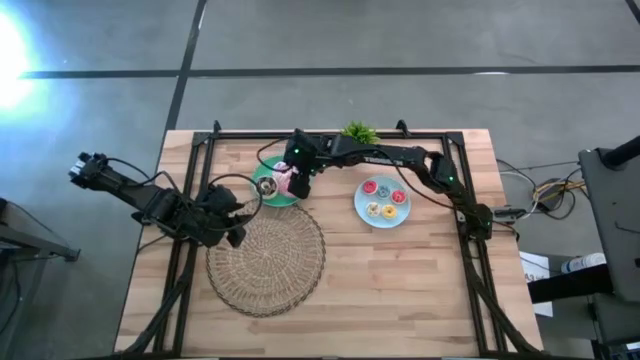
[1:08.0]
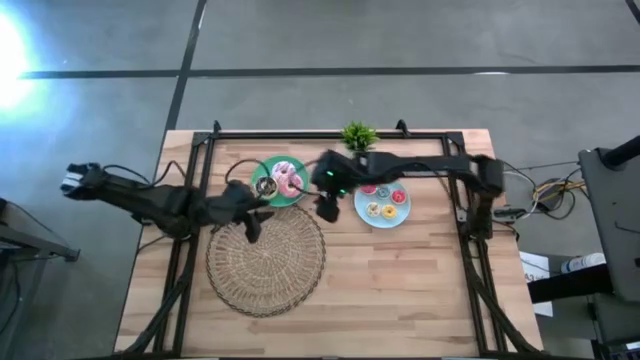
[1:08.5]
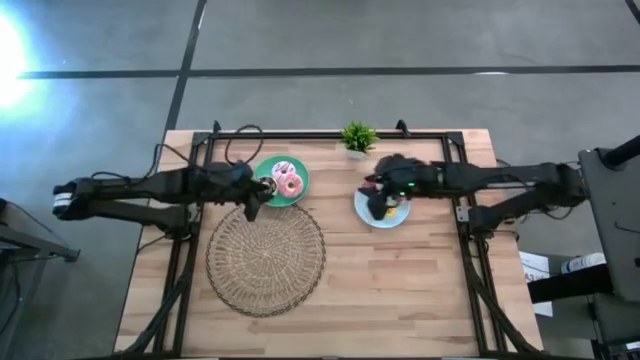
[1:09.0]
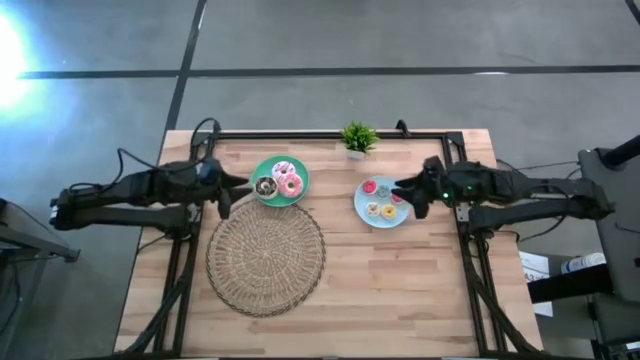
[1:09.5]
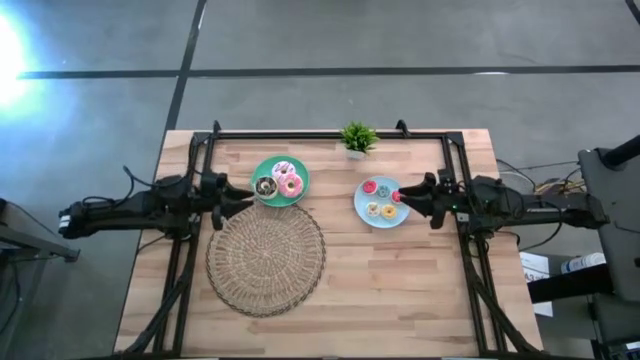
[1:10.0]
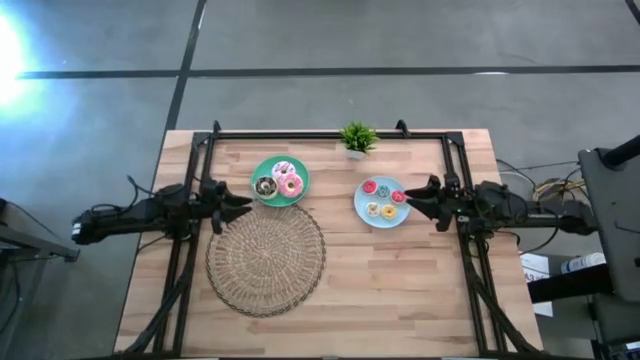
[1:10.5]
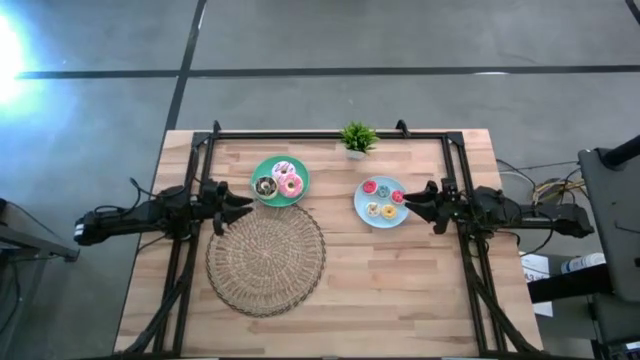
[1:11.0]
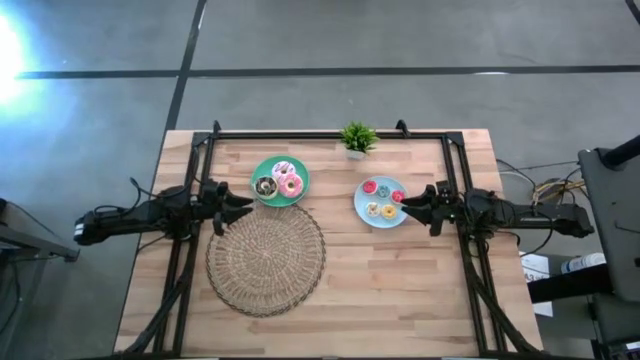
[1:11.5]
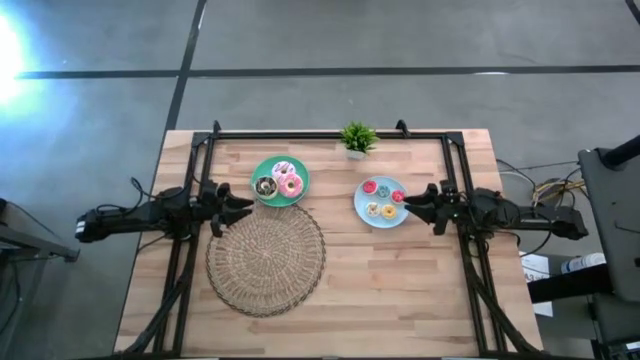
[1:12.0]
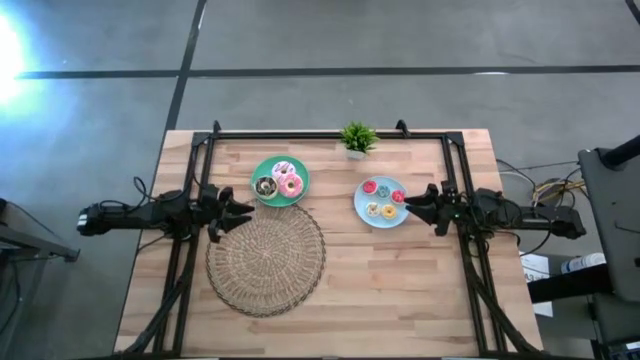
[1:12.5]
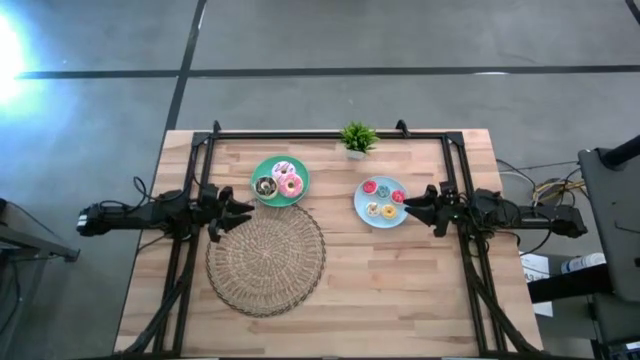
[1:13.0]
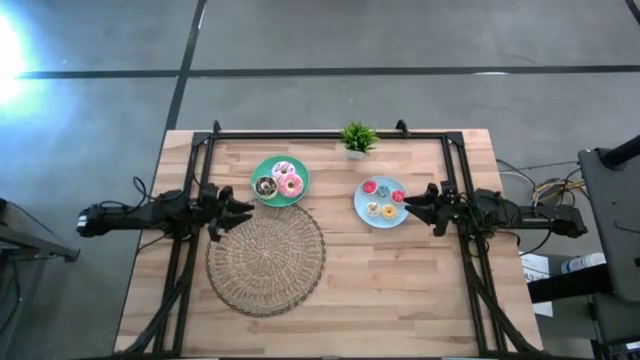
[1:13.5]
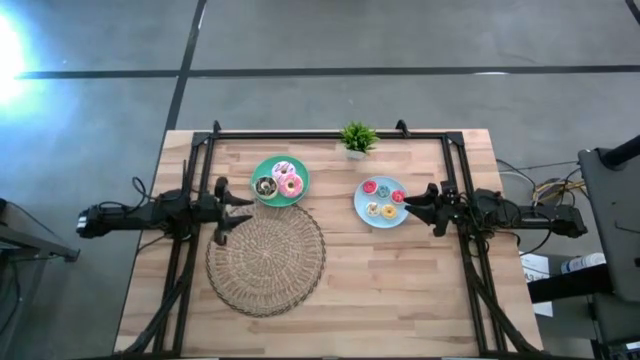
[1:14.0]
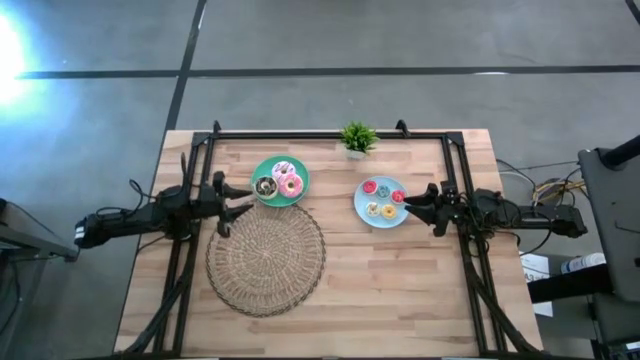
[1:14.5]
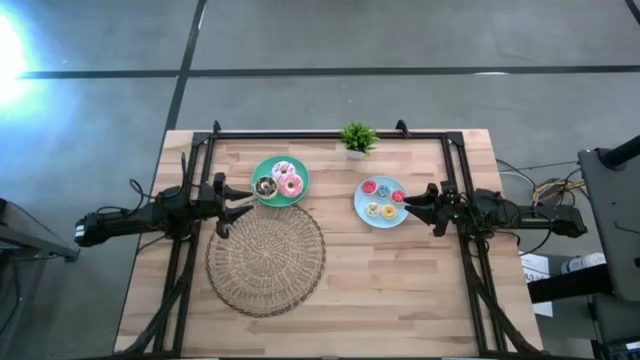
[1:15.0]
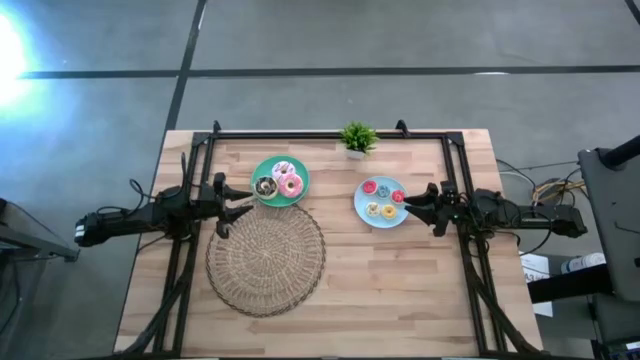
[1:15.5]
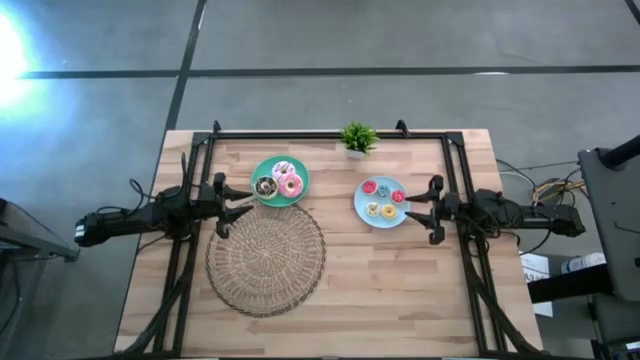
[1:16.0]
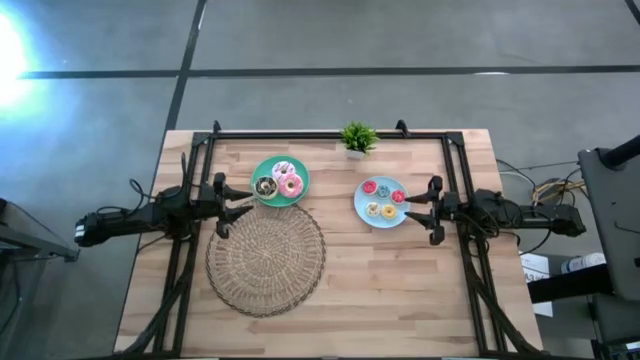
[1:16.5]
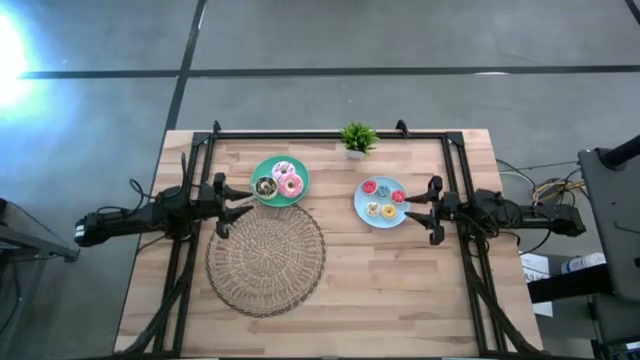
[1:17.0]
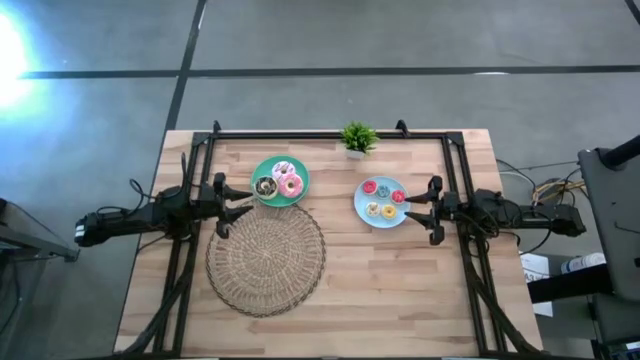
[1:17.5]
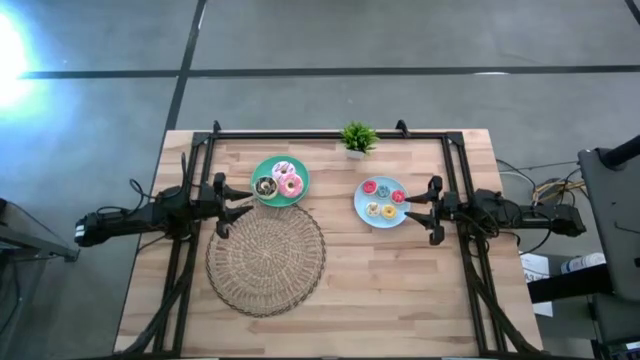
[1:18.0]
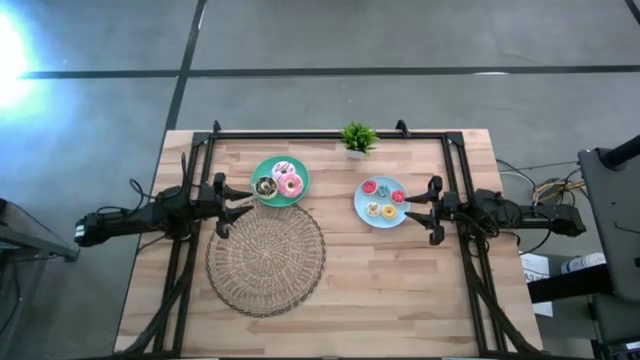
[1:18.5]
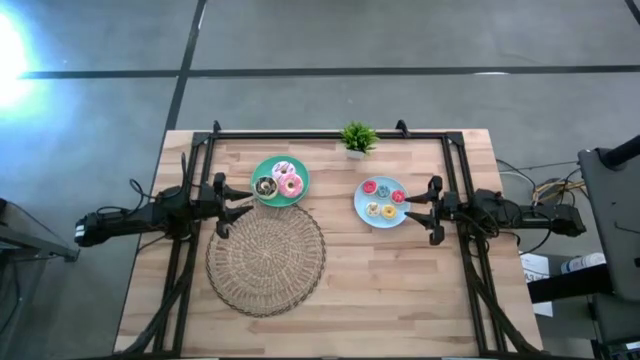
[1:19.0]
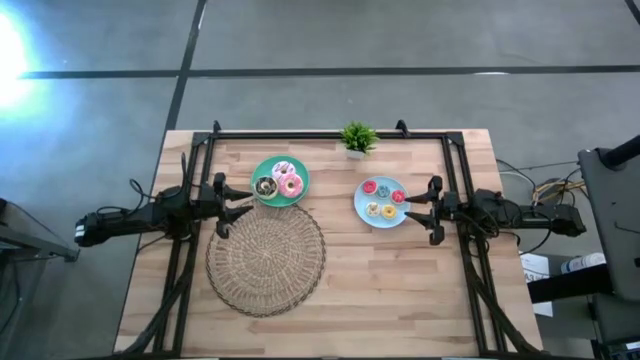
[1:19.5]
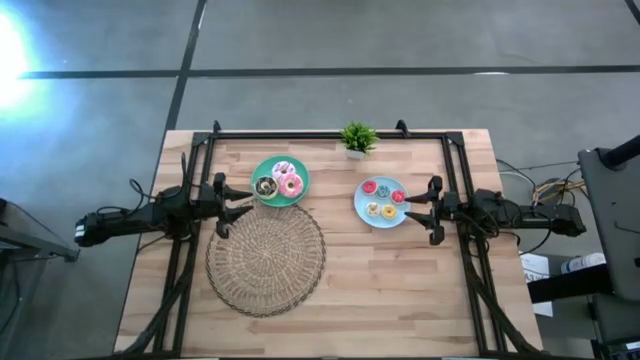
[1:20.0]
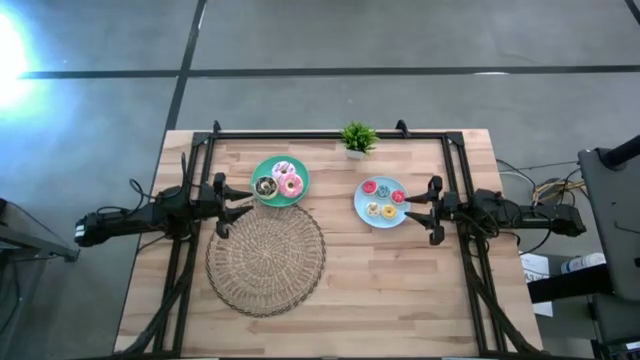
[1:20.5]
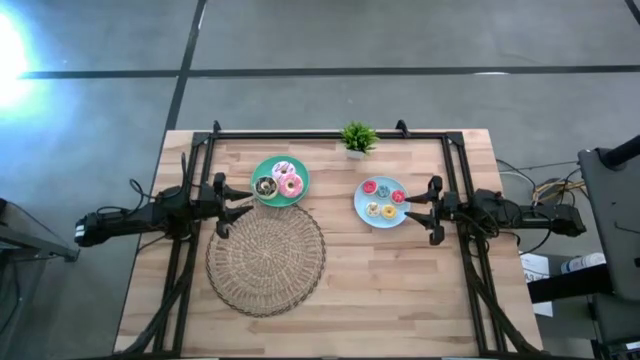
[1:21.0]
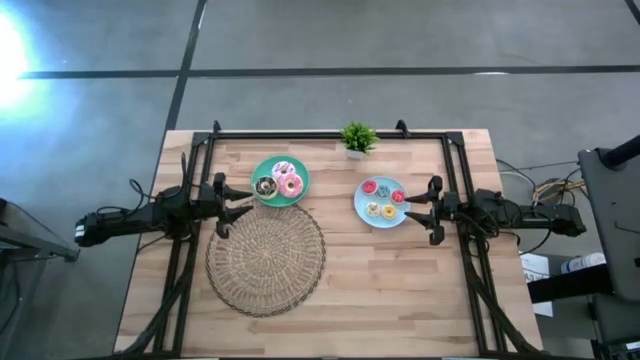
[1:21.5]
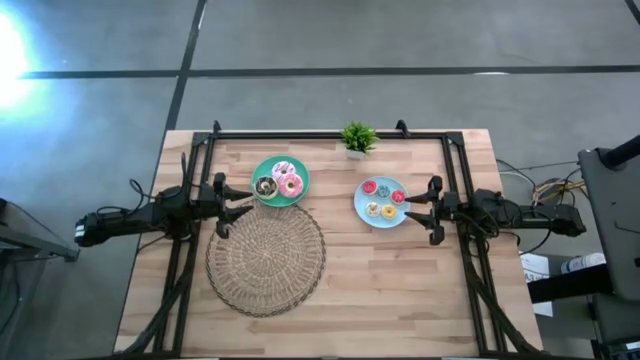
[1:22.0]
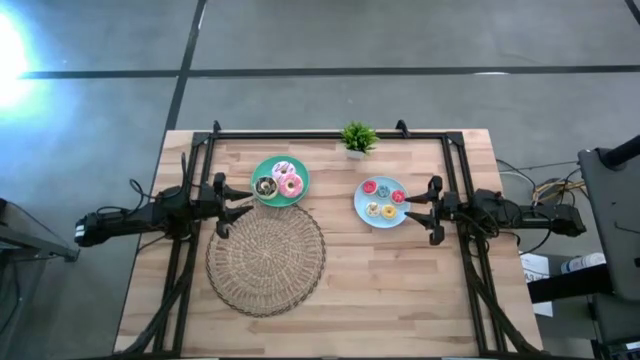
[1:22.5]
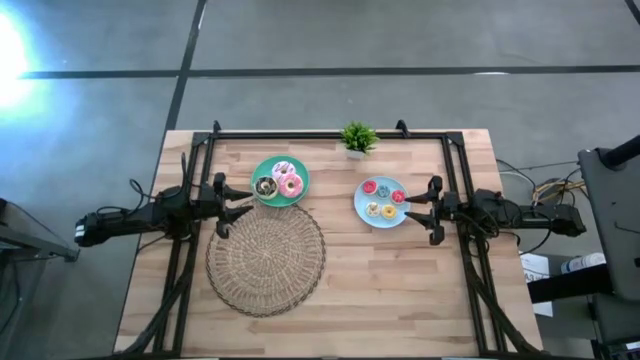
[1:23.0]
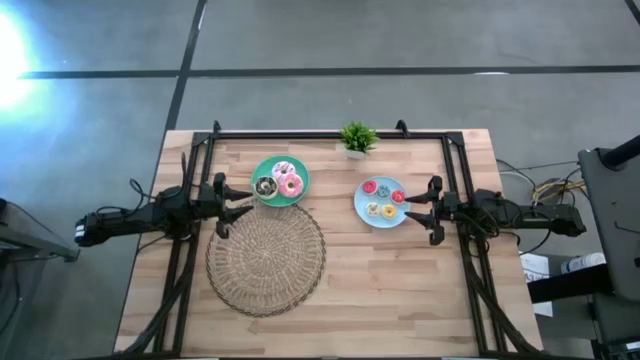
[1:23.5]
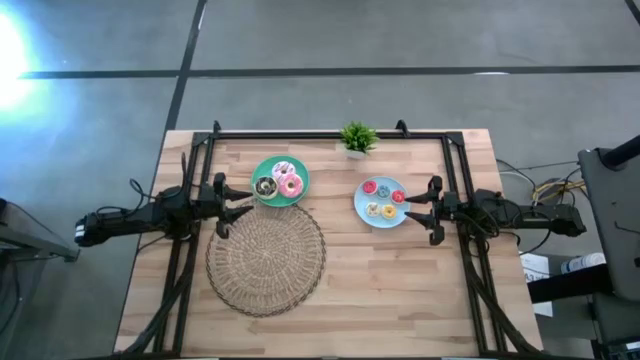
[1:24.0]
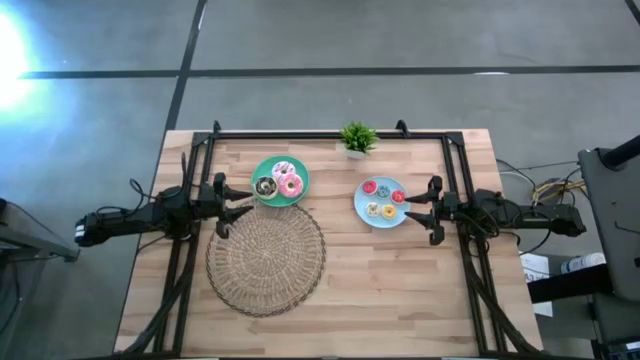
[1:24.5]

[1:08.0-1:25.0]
Task: Pick & Place donuts
Return to Home Position

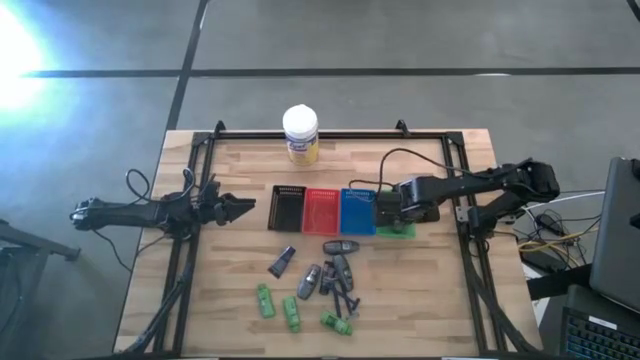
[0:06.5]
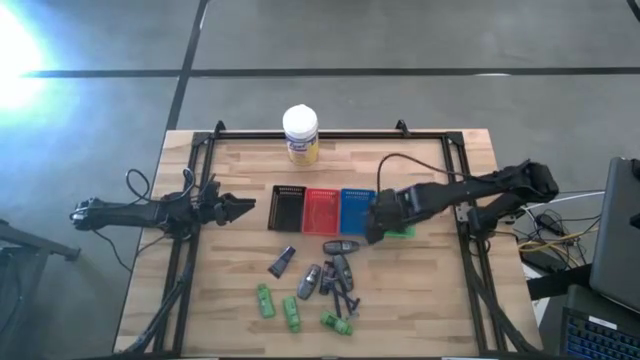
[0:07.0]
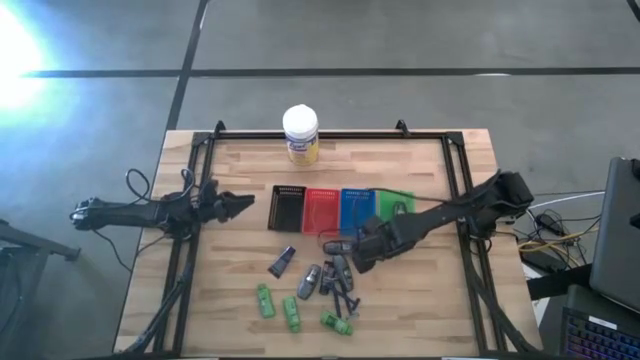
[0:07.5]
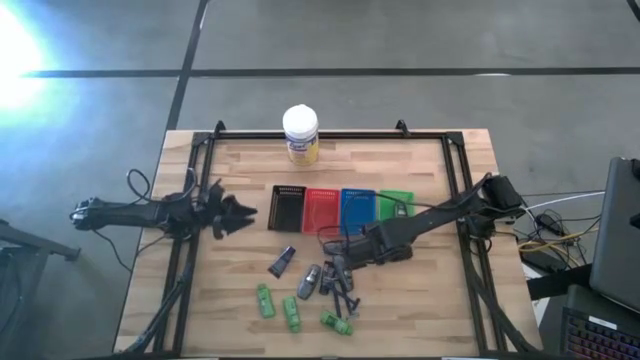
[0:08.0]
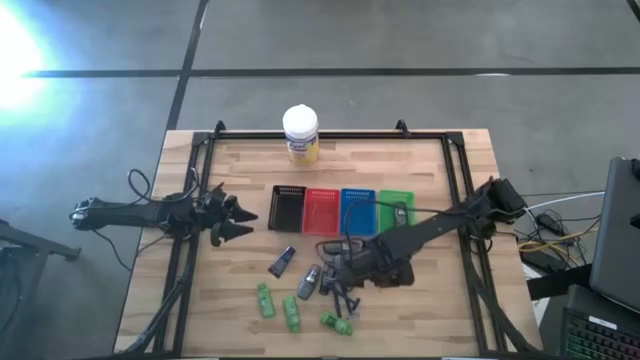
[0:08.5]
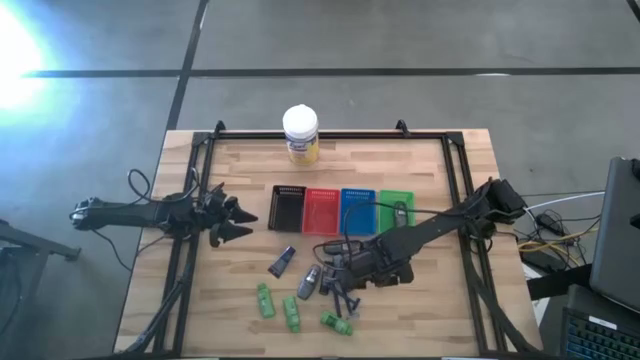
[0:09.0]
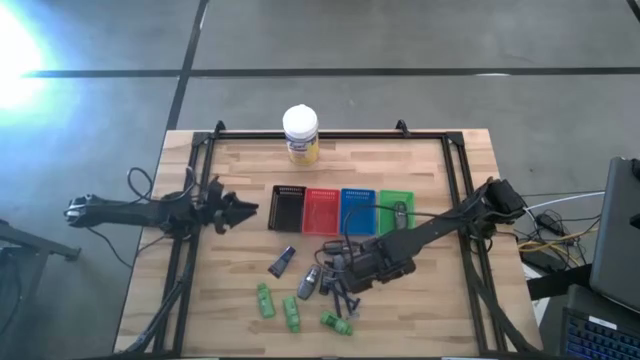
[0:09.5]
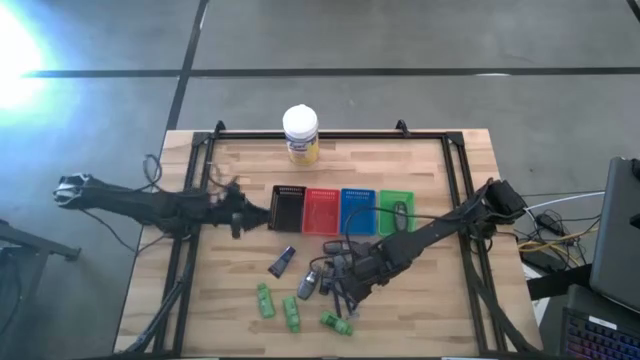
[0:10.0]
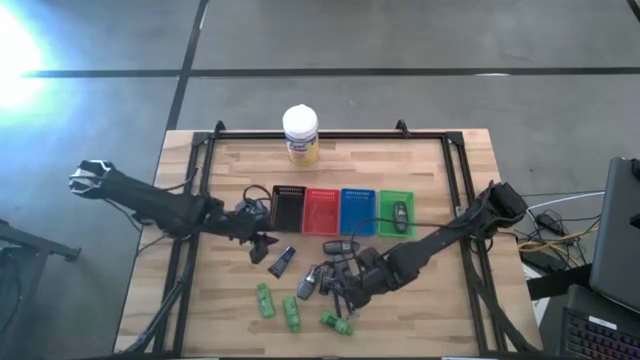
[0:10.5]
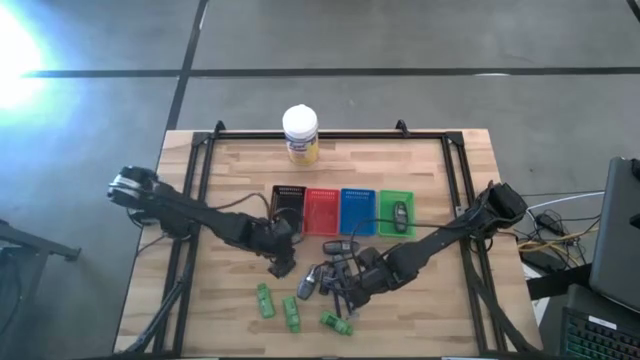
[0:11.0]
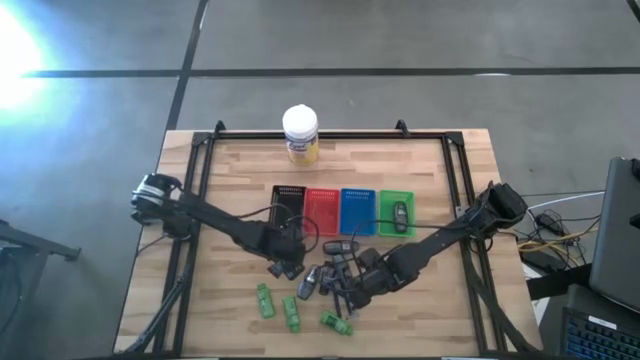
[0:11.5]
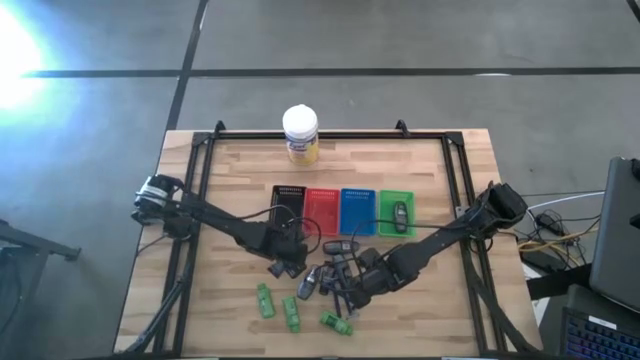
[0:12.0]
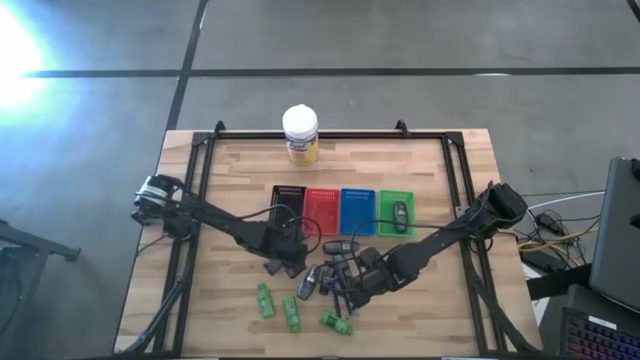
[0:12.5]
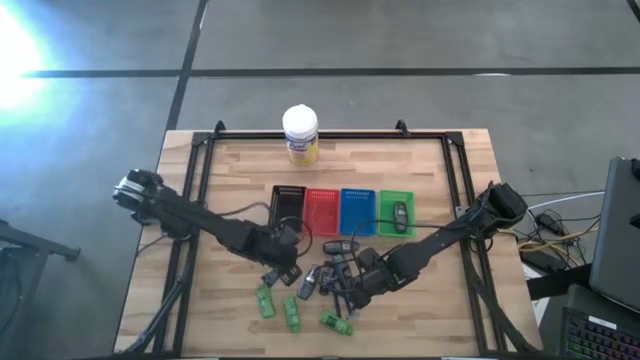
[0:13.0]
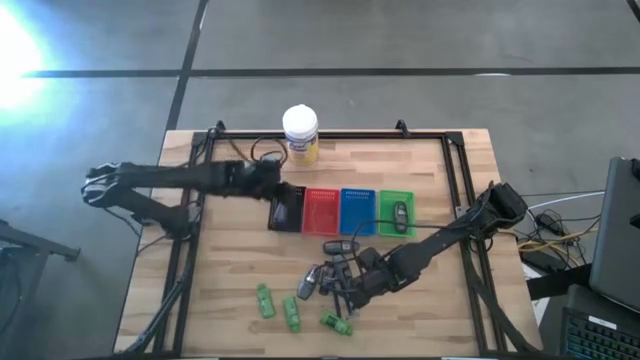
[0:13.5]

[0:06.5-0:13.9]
Task: Pick & Place Travel size toiletries
Put the blue shave cream into the black basket
